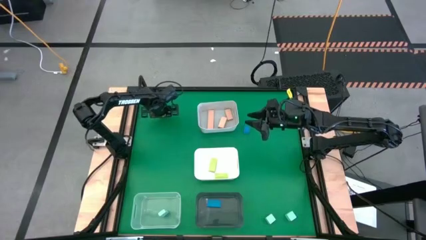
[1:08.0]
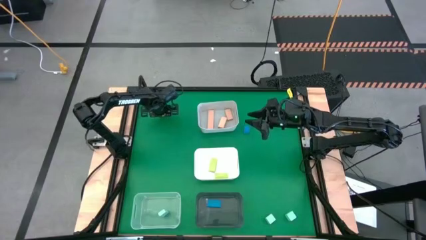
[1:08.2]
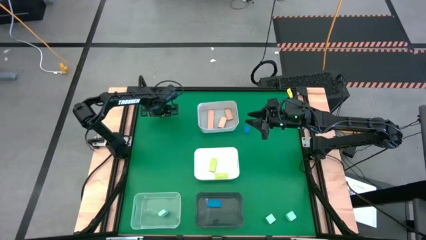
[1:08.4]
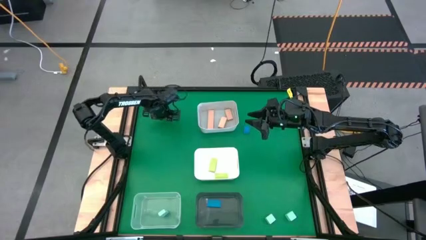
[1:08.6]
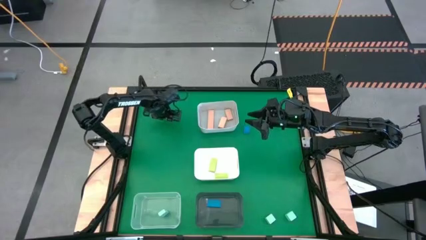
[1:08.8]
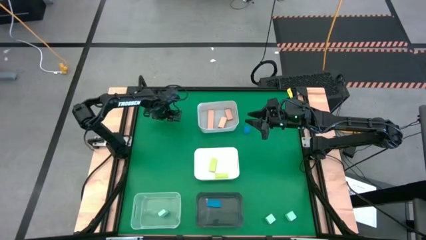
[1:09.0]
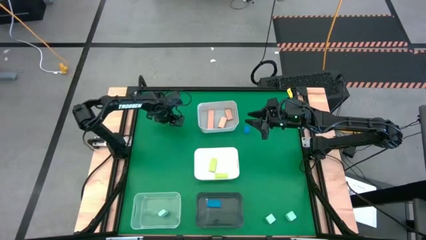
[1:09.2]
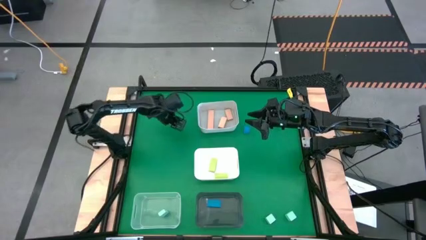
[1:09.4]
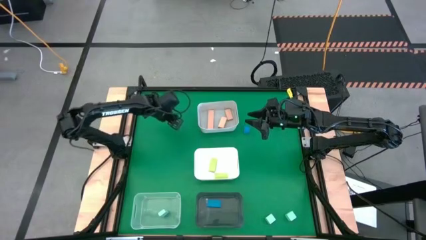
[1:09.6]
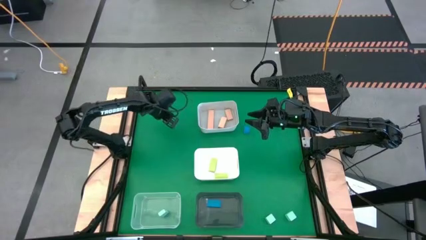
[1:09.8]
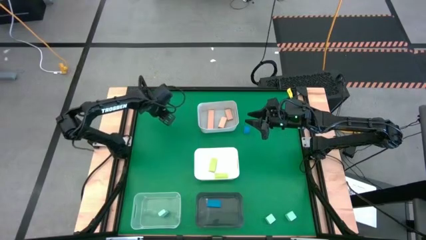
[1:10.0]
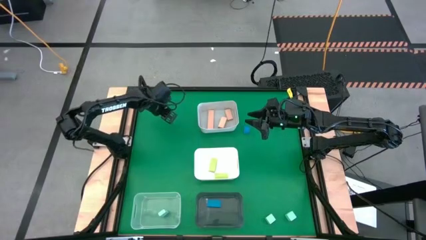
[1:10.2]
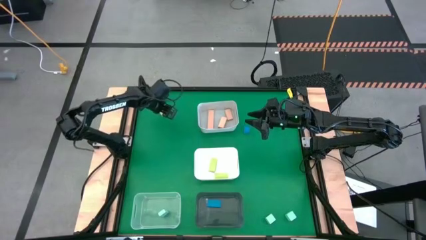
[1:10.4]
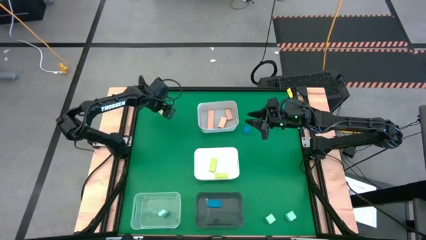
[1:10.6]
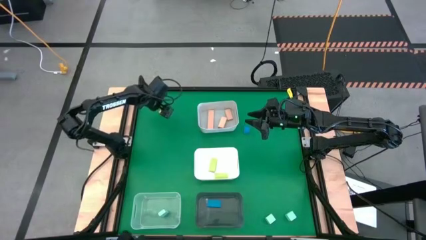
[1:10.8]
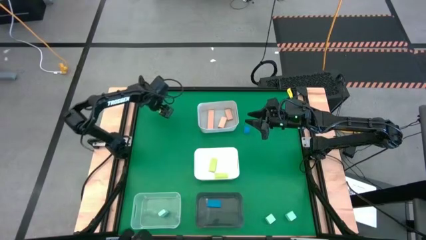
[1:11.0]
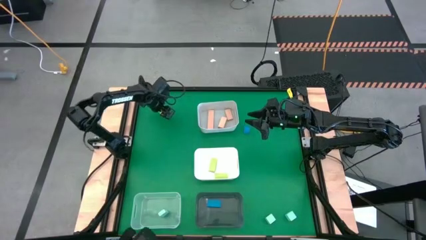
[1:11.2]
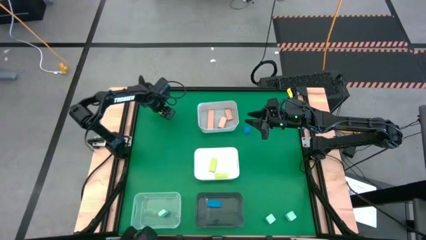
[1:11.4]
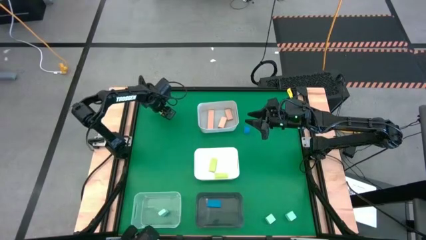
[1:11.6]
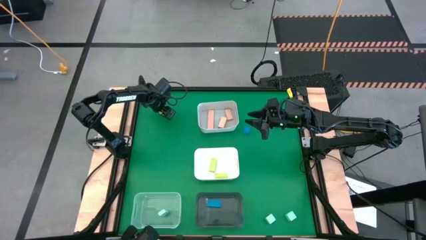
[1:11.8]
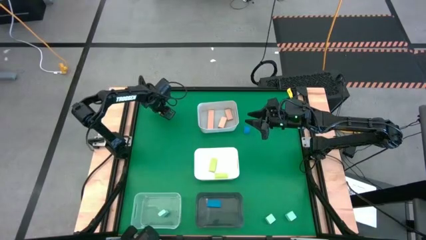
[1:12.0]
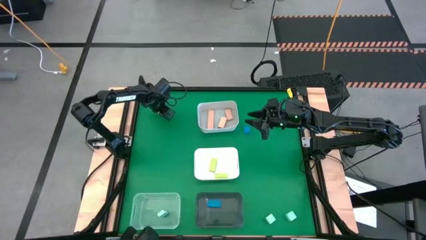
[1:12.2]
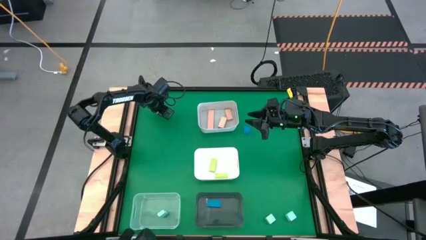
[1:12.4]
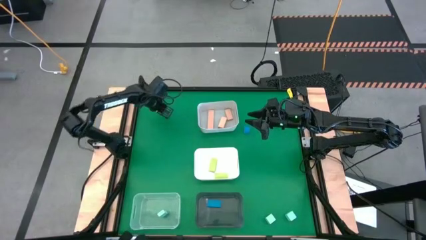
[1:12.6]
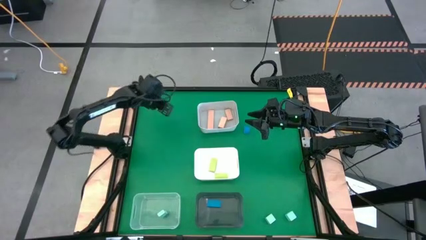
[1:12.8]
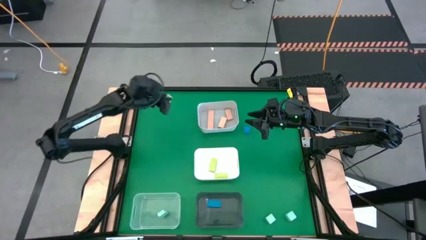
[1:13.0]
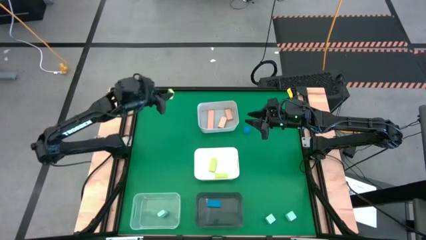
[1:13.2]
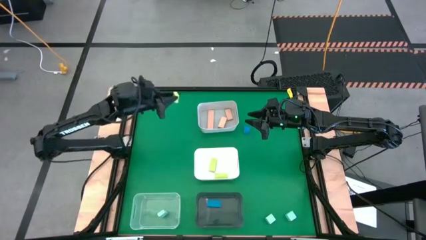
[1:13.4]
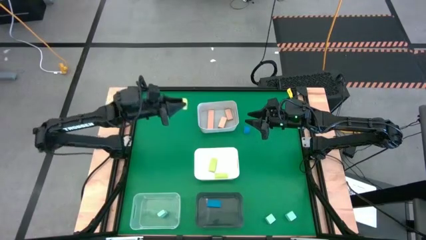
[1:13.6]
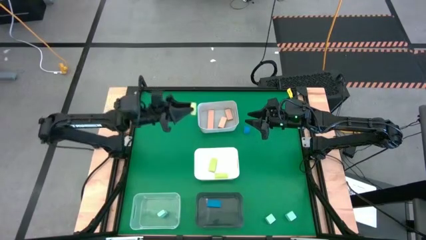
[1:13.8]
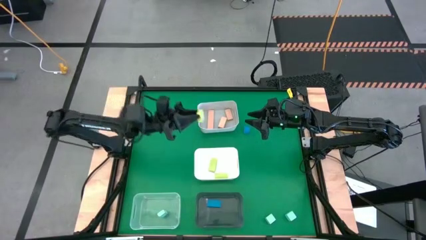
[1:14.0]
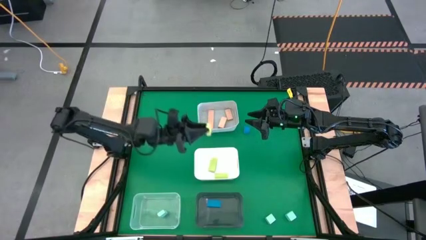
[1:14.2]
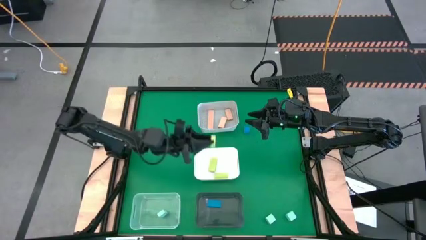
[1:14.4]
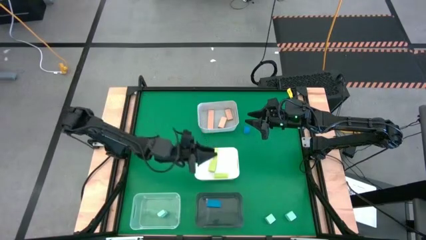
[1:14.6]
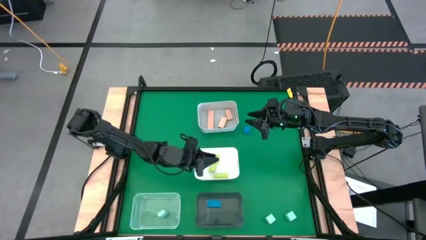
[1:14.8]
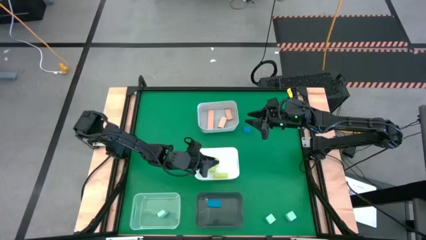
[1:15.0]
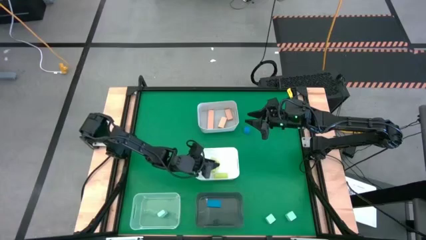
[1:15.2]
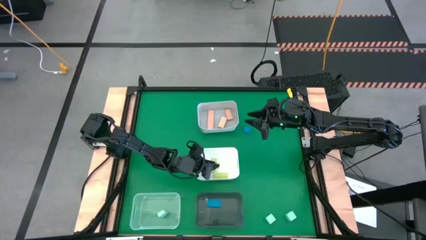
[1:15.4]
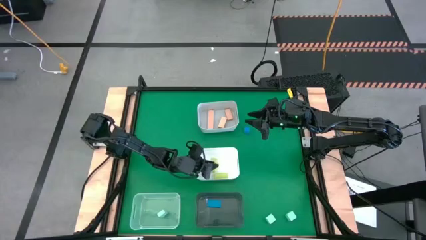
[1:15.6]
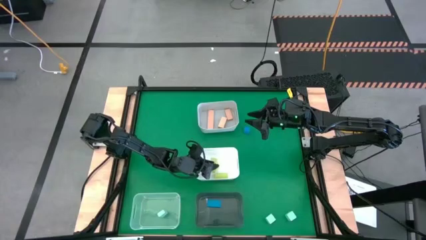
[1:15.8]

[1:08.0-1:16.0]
Task: Sort & place blocks by color
Put the green block into the white bin

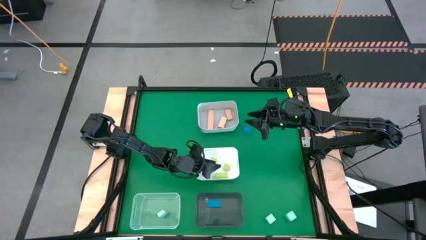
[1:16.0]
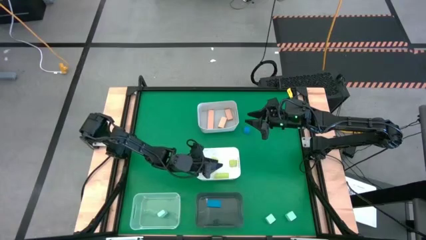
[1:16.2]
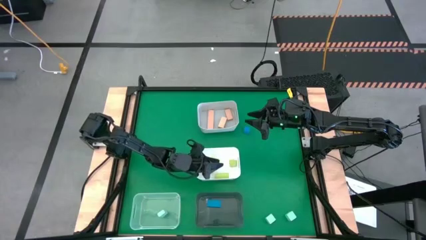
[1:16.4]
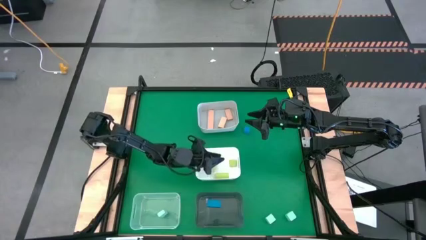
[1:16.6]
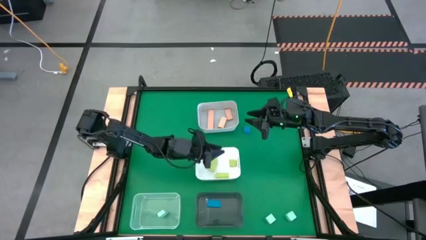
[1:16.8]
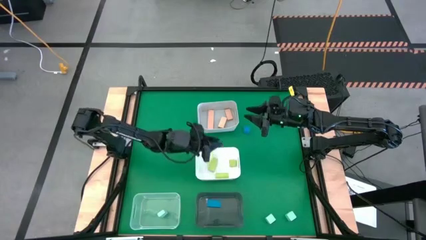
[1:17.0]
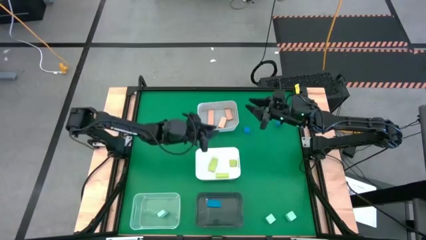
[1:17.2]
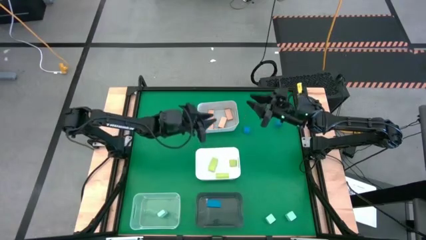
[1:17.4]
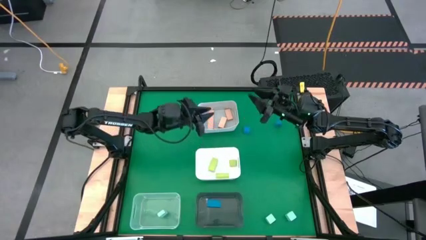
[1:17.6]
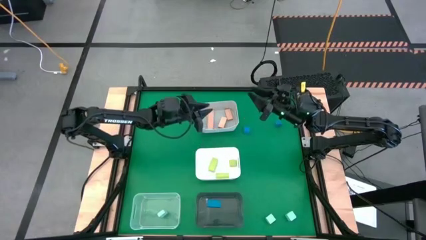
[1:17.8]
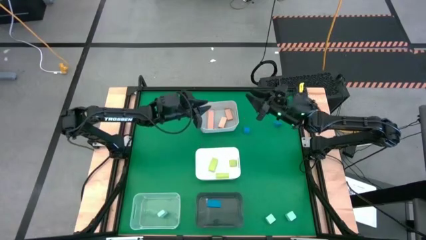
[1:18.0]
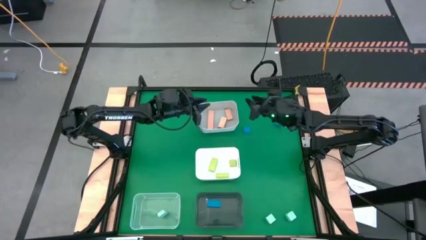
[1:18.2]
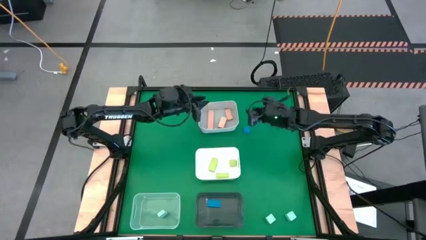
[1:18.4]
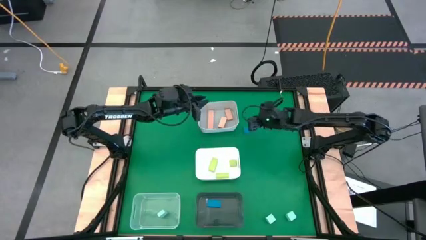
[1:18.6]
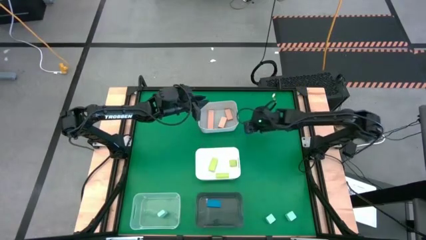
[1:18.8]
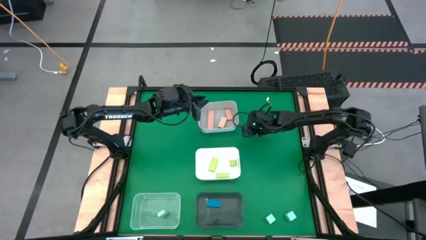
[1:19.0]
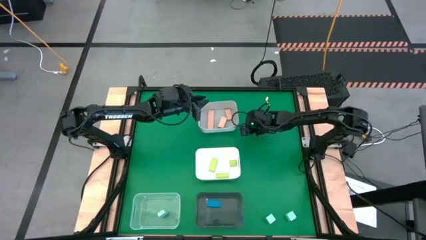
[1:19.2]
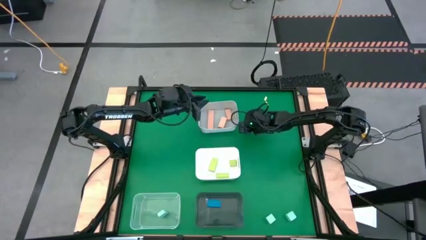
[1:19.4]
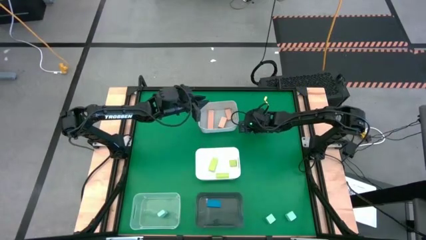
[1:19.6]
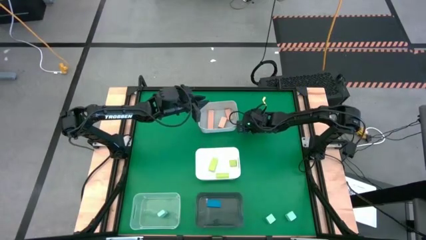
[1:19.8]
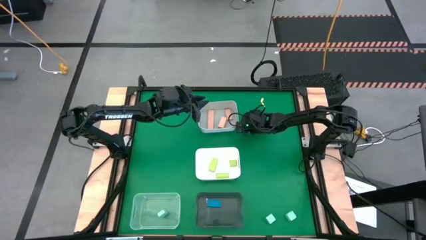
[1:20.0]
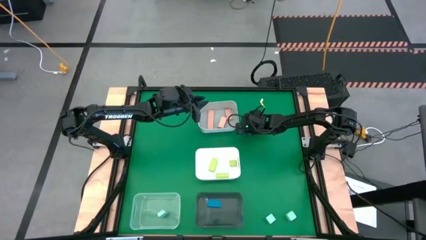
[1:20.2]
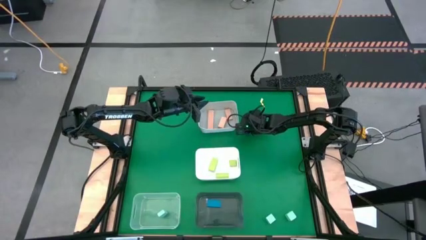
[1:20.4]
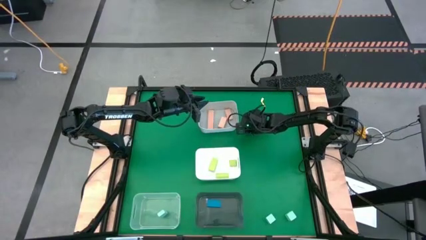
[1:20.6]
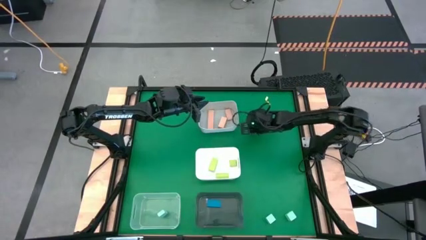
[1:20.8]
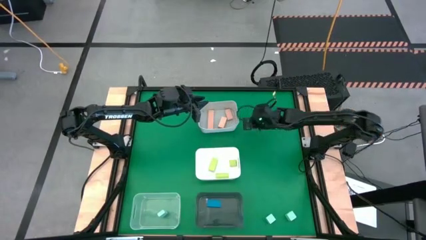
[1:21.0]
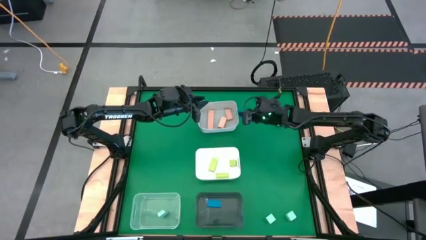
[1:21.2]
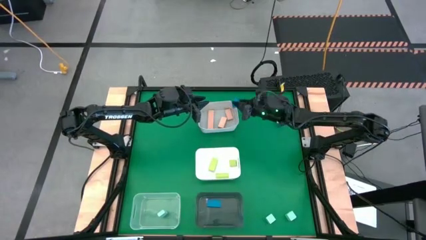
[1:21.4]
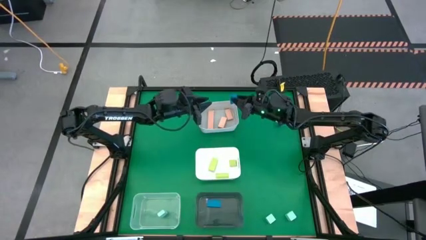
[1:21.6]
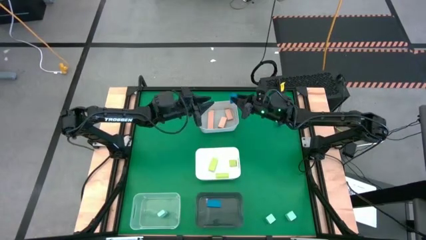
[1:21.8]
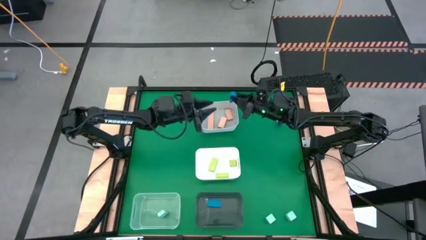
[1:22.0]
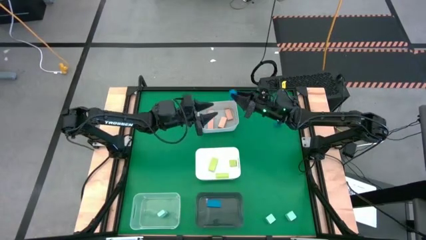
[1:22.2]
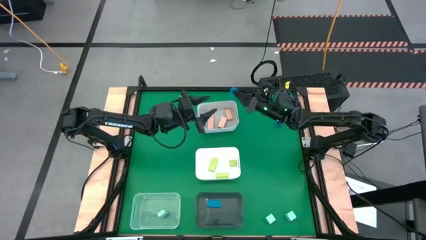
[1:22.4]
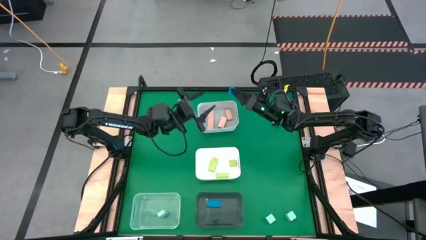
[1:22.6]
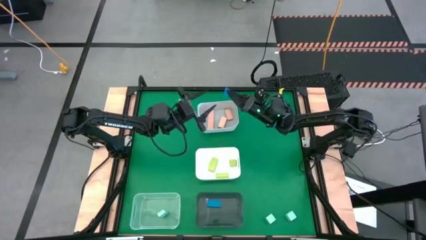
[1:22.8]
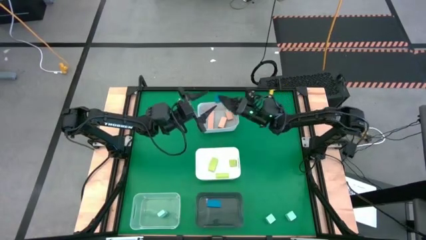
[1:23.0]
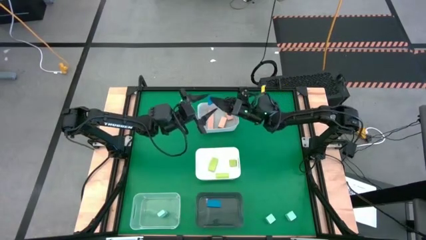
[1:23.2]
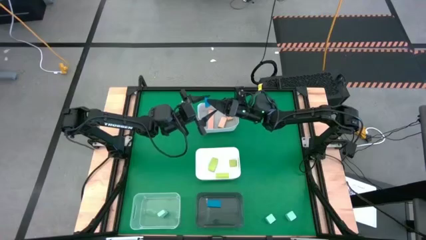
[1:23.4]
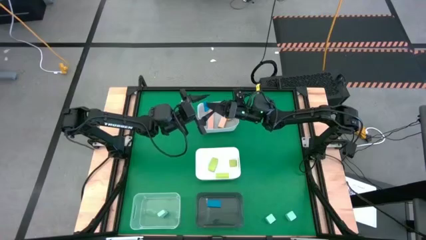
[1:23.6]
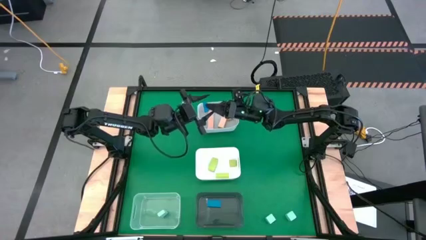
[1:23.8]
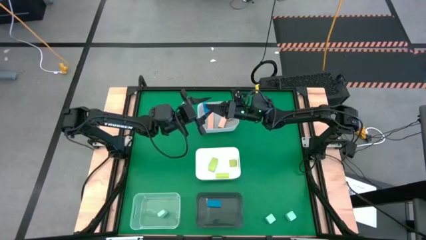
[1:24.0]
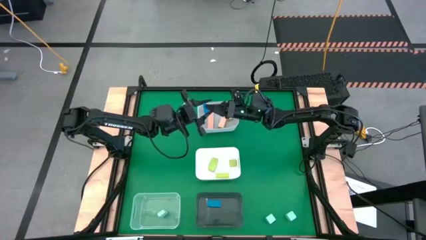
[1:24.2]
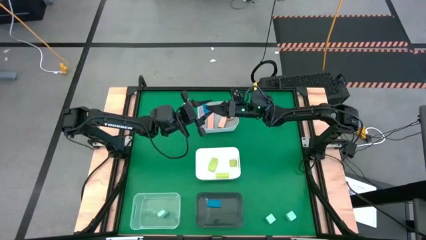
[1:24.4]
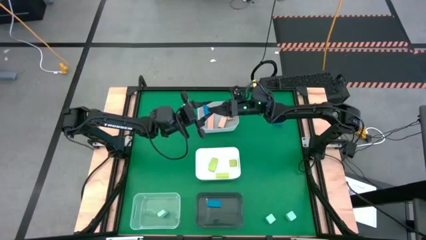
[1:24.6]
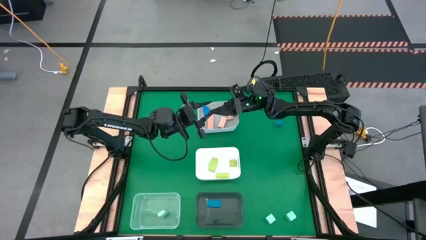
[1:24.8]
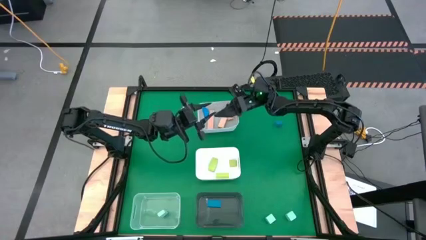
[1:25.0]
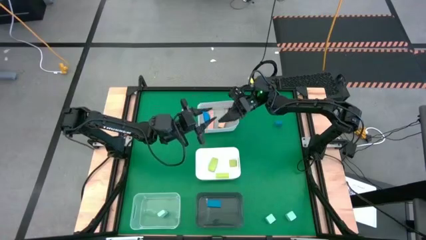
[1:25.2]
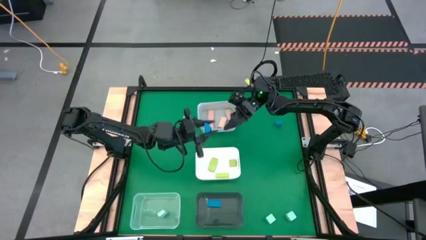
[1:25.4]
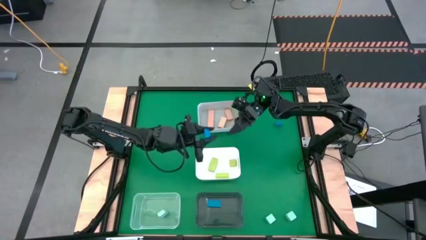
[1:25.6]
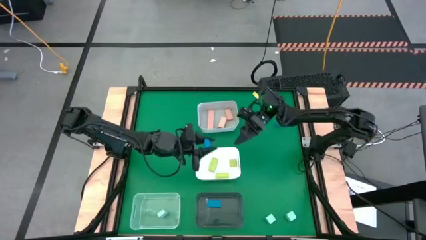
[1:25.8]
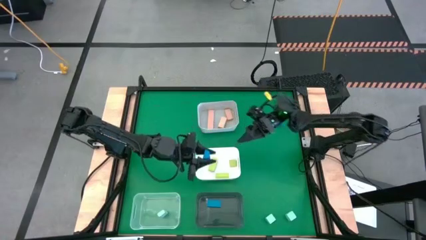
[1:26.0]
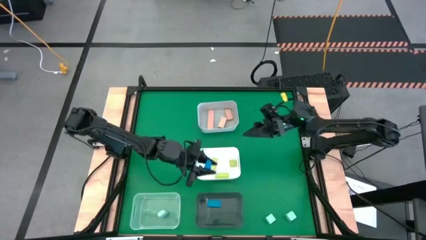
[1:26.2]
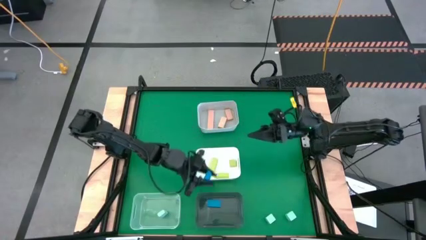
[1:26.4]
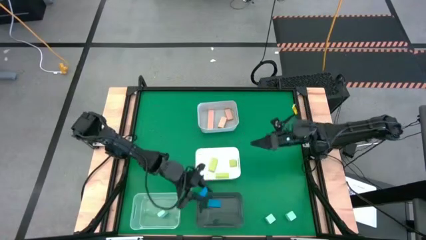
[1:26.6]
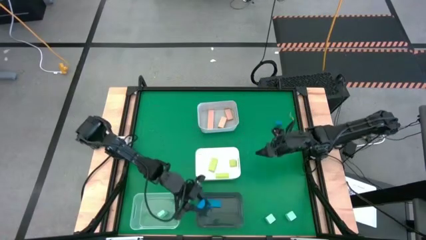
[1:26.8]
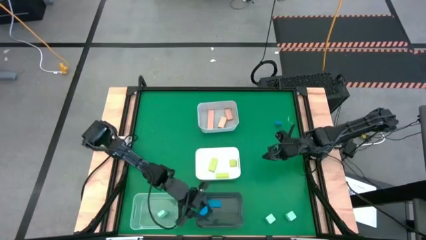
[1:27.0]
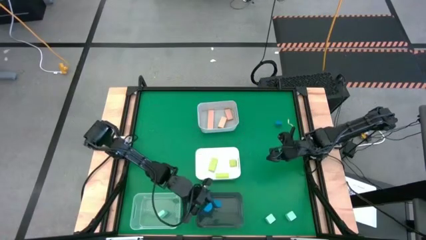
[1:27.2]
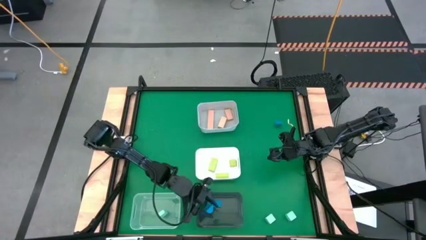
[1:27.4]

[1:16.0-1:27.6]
Put the left blue block into the black bin
